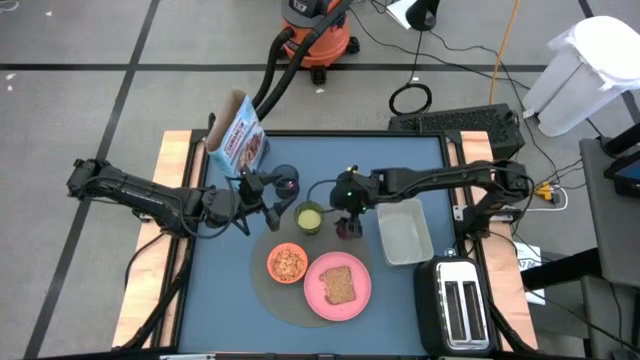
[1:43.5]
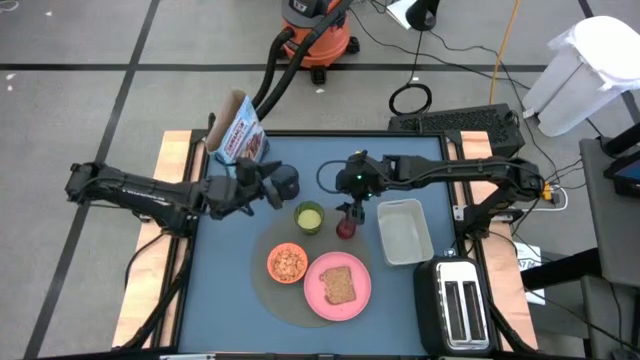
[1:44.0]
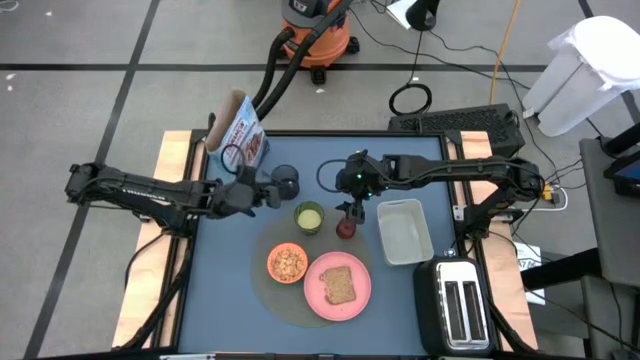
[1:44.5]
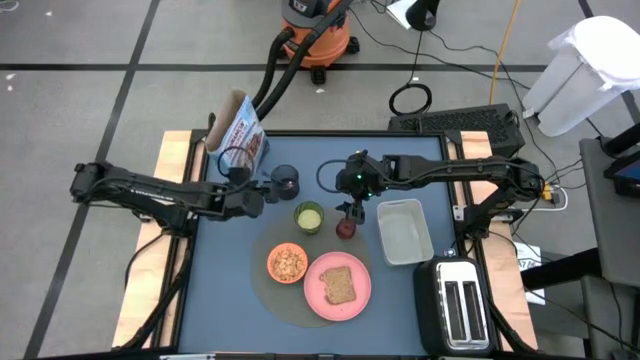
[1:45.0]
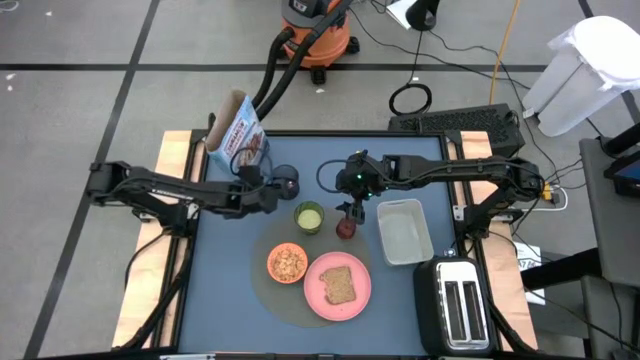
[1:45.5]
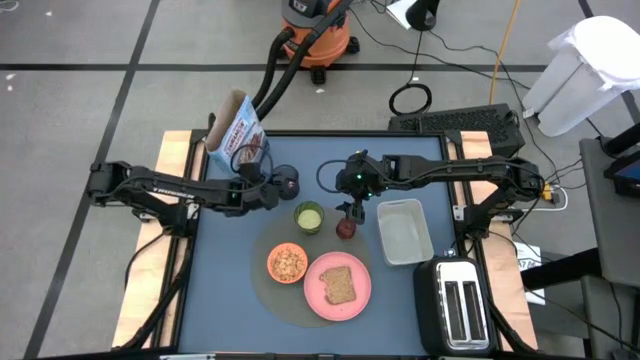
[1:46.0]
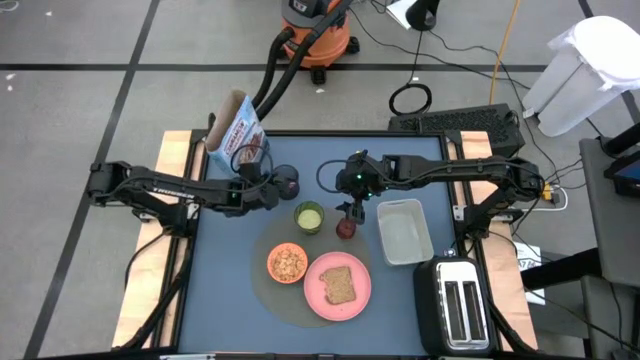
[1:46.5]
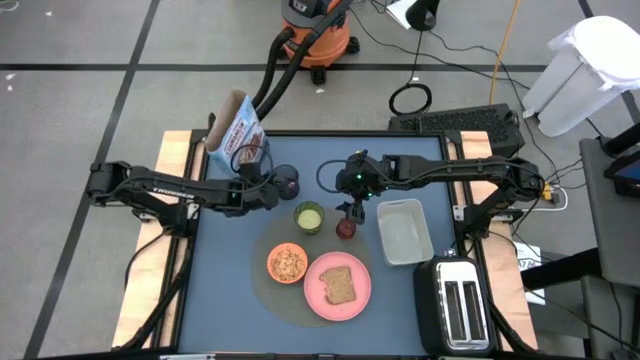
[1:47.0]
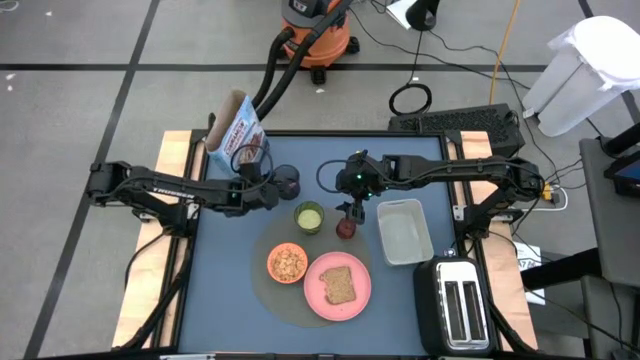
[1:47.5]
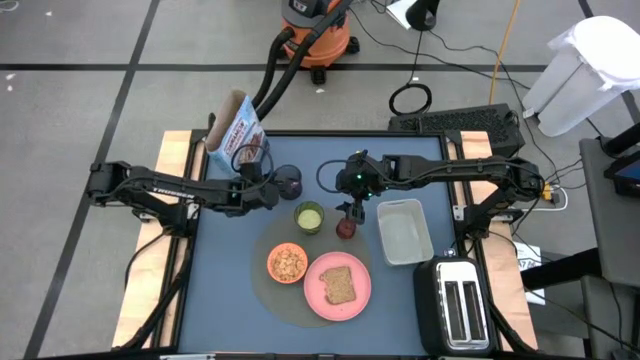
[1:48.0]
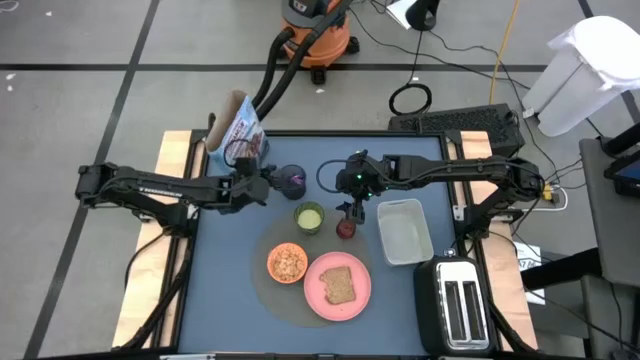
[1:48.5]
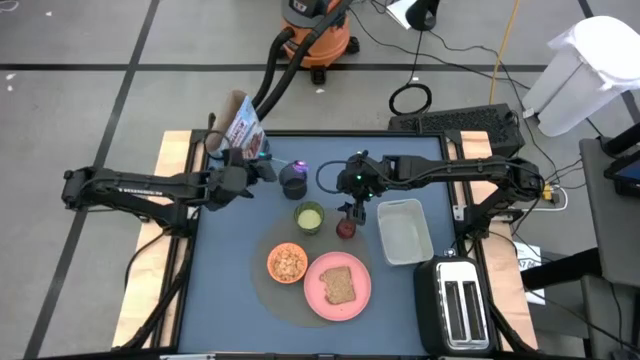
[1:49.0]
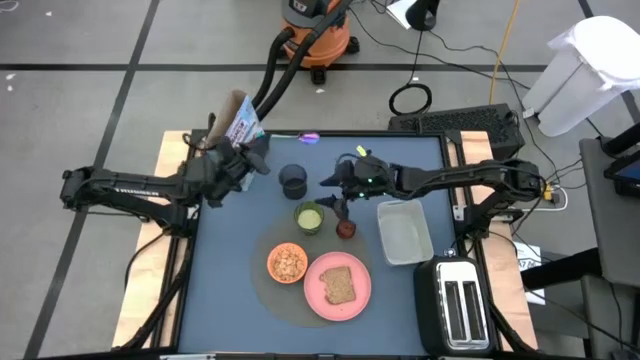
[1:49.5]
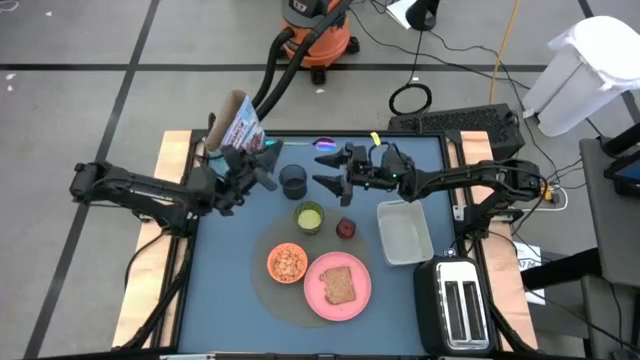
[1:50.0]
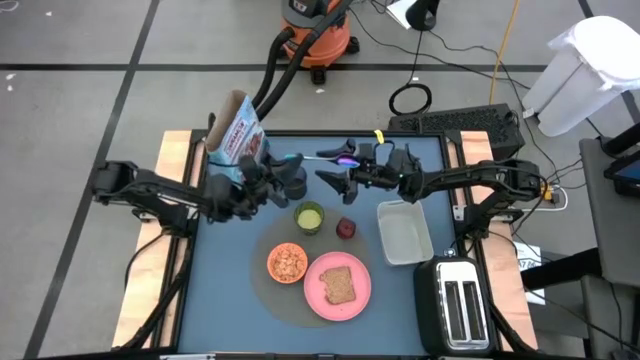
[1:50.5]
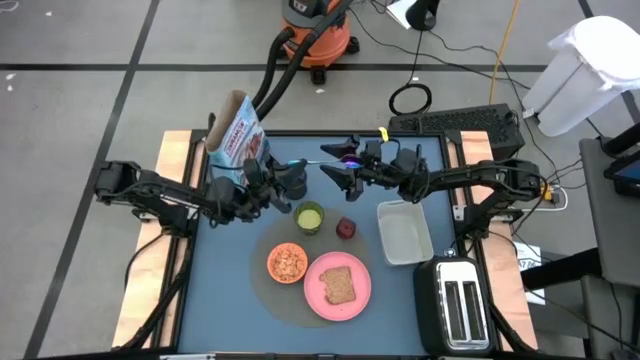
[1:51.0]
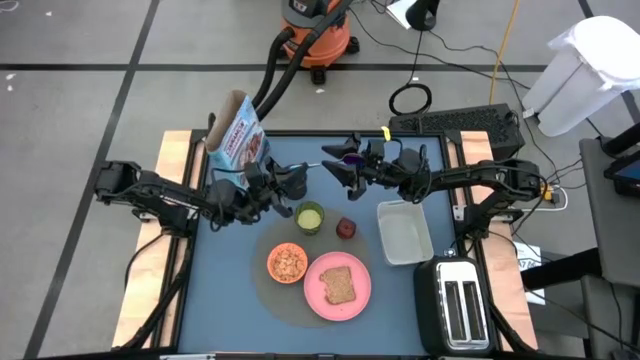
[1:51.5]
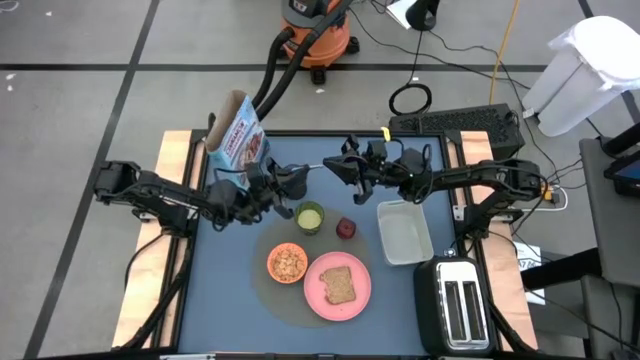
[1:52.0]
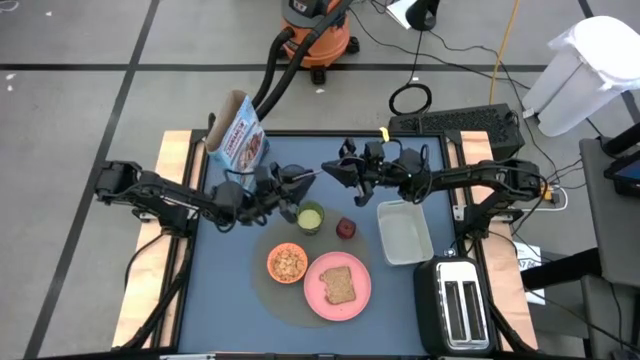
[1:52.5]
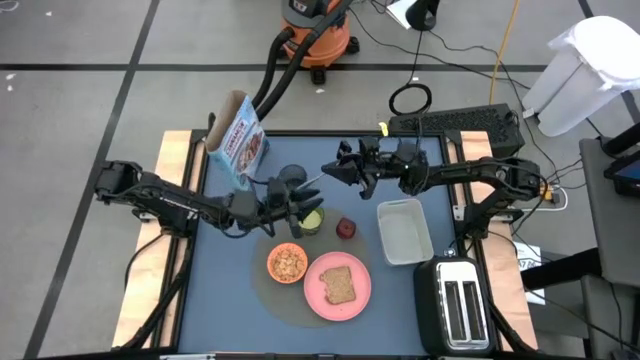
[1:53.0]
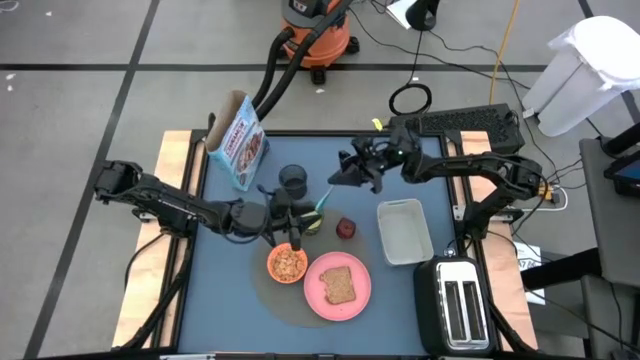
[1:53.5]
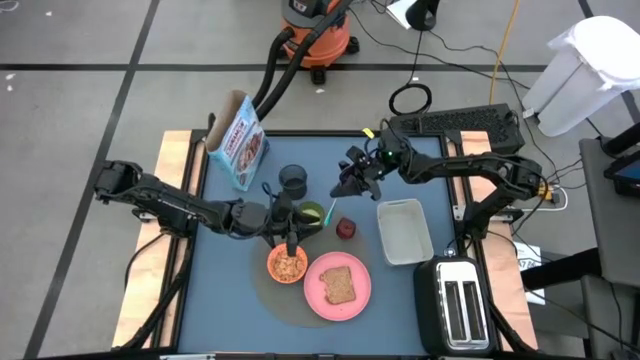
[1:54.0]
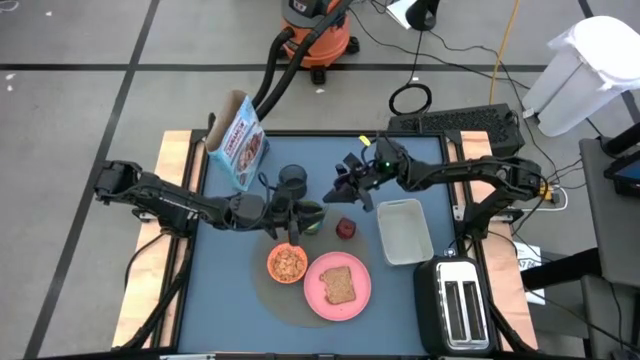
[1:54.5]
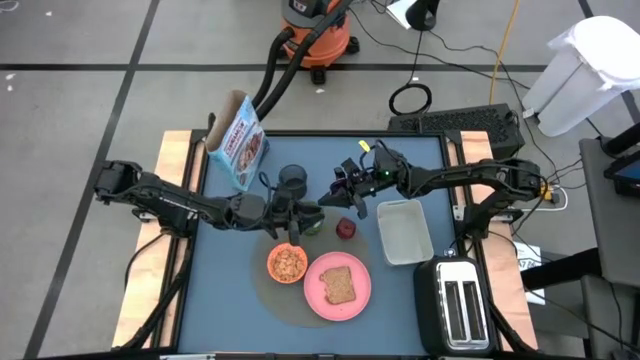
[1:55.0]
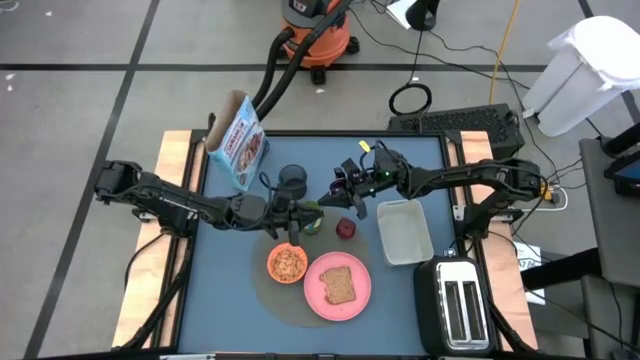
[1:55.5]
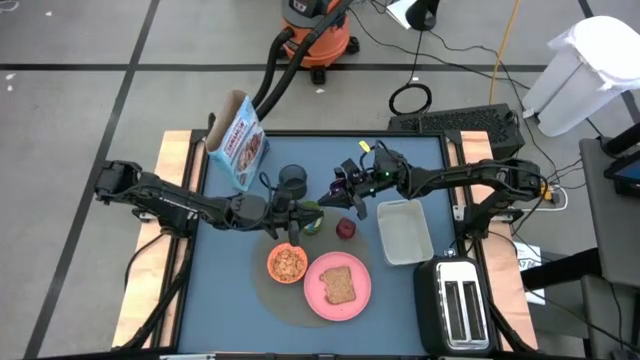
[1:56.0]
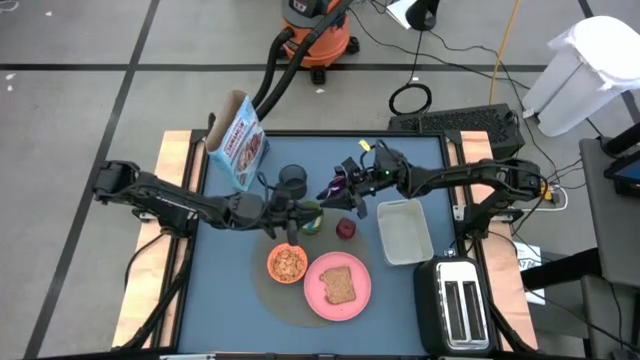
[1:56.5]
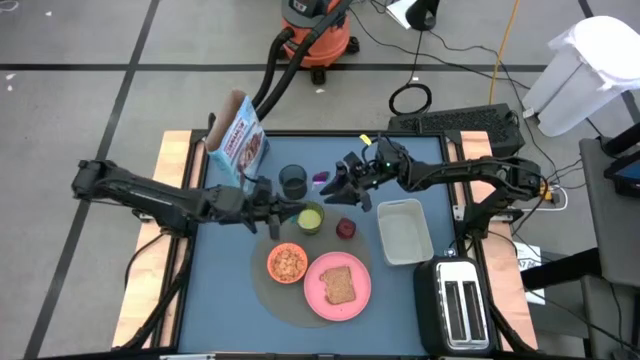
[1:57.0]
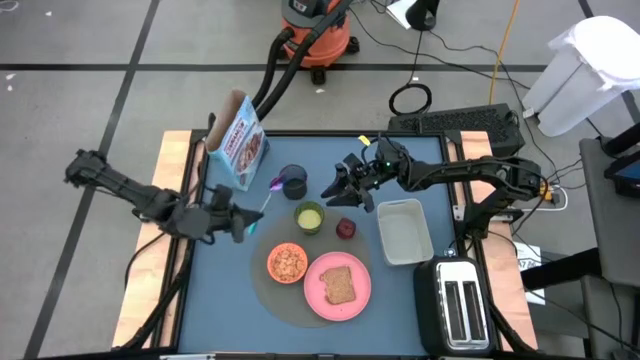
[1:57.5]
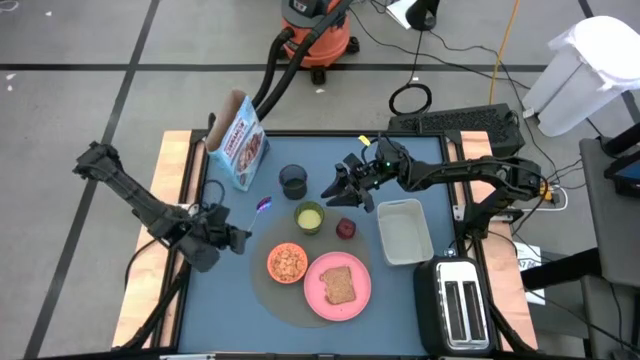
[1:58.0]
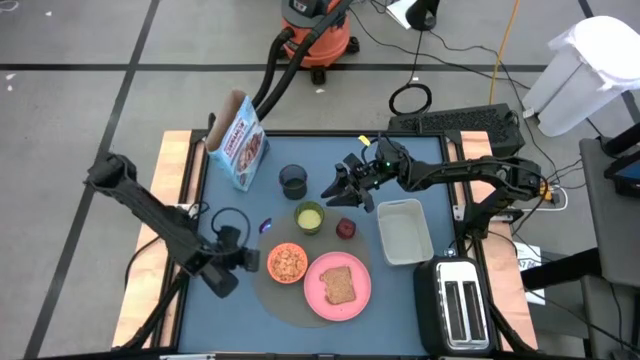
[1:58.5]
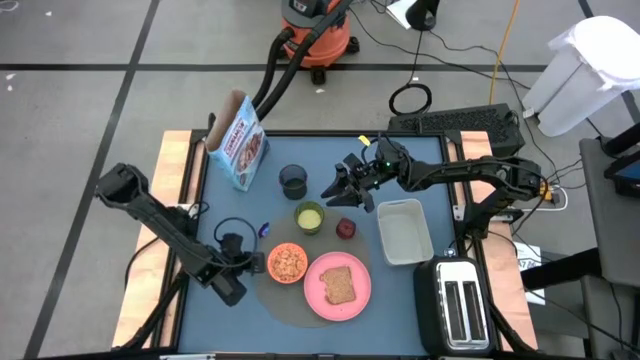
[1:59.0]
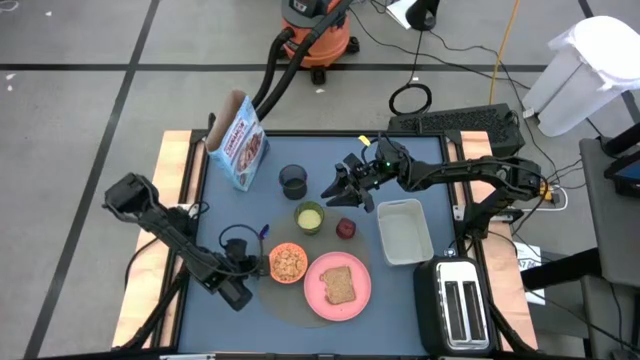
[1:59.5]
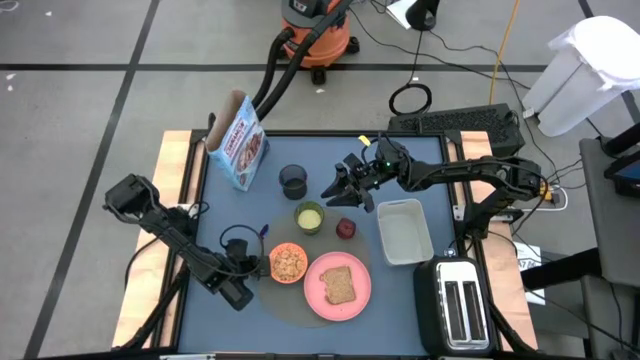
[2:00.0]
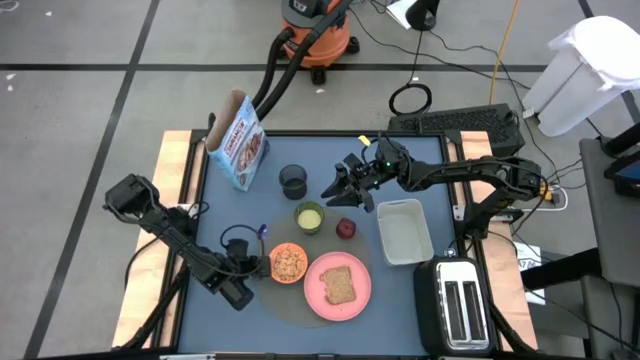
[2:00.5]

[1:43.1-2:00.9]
Task: Arrange a breakfast setting
Put the spoon on the gray placemat to the left of the red bowl

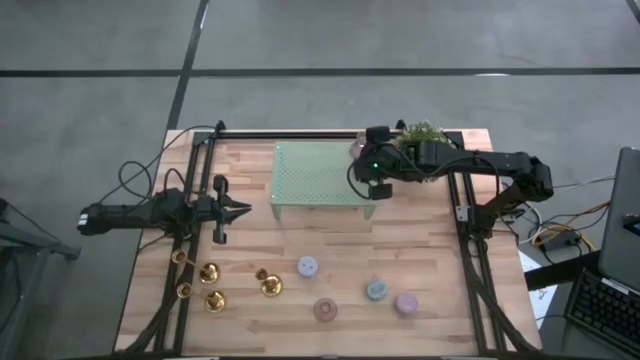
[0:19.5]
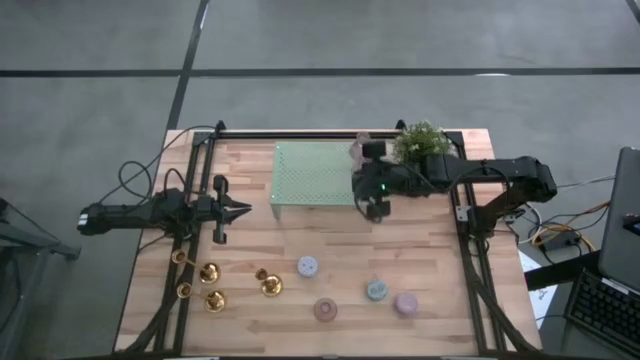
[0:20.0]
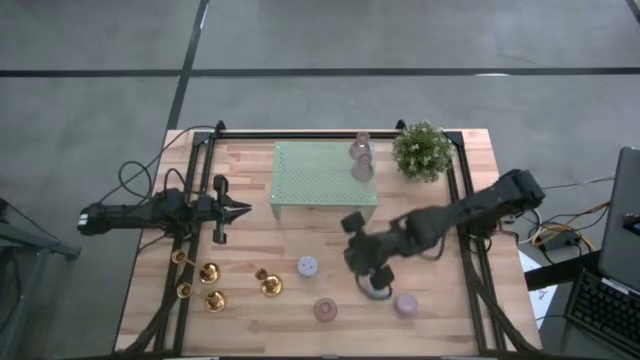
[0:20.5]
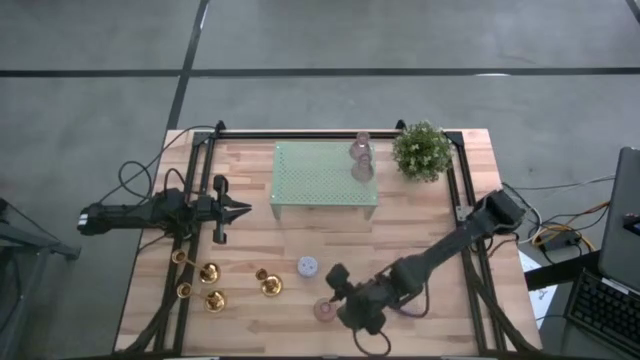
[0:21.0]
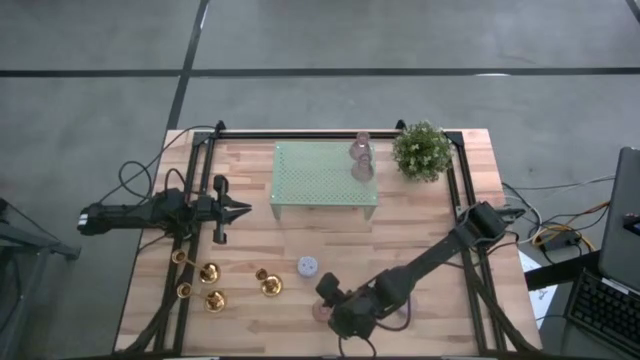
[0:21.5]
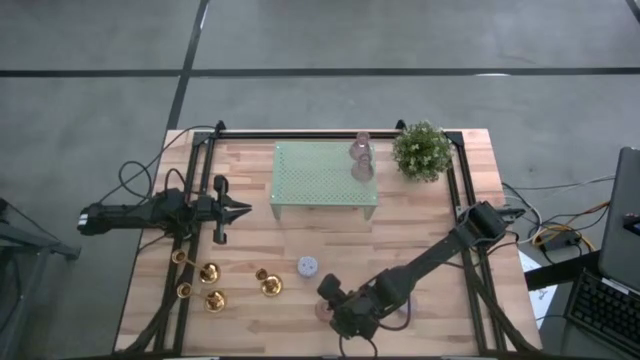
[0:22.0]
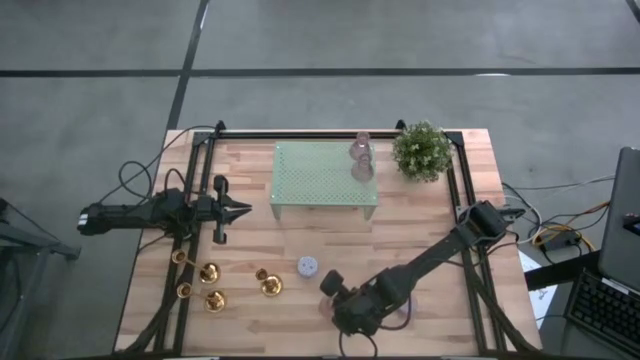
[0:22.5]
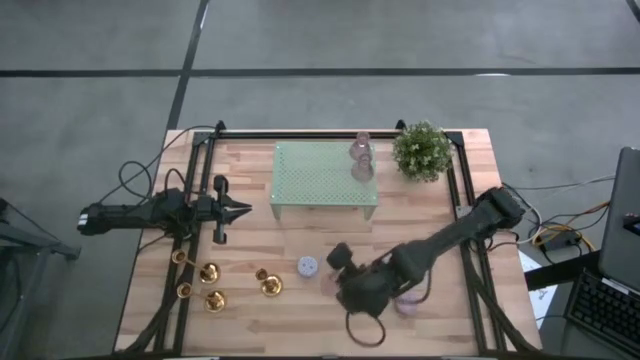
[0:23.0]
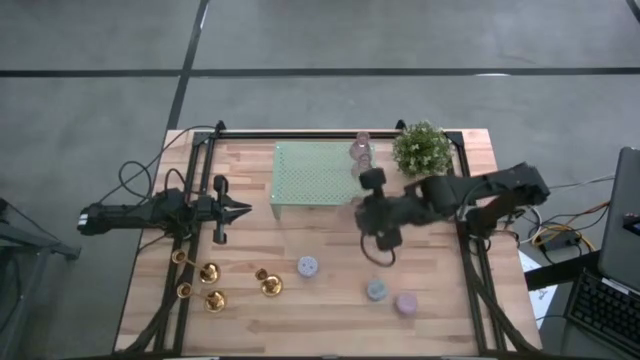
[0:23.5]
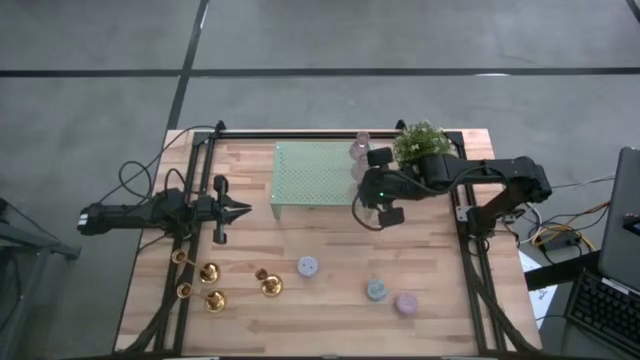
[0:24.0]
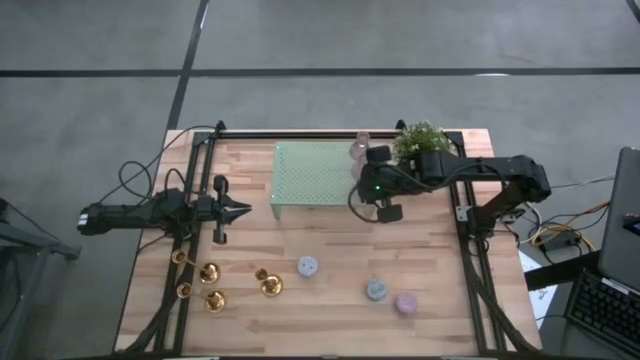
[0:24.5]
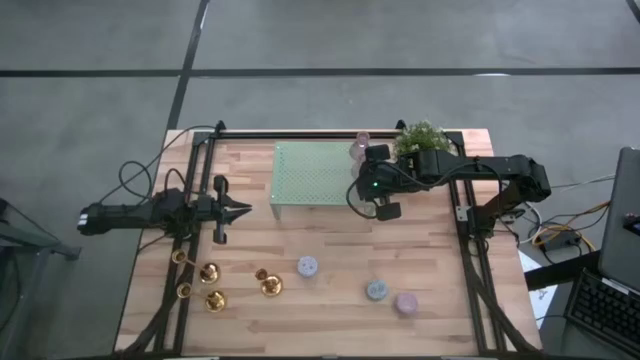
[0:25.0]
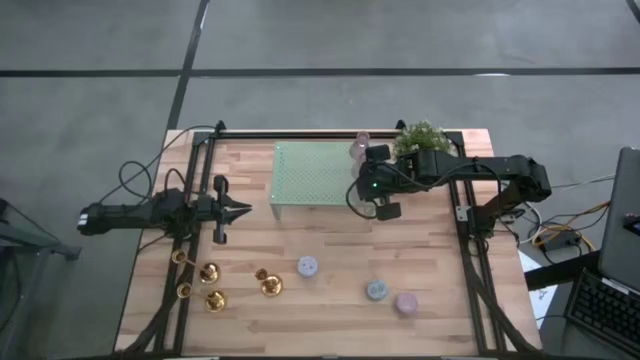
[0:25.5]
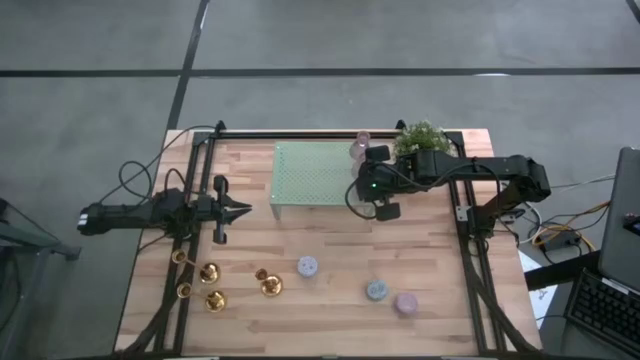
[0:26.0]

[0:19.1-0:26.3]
Task: Pick & Place candle stick holders
Put the pink candle holder on the shelf aligned with the other pink candle holders
